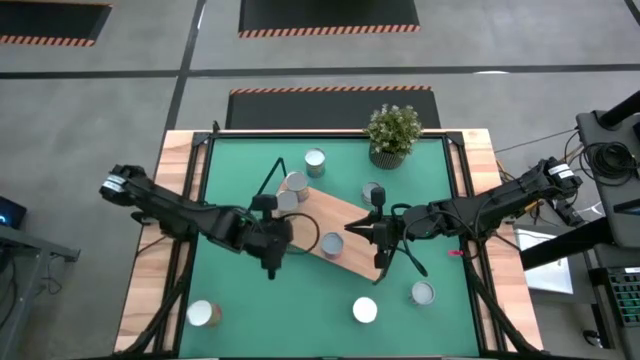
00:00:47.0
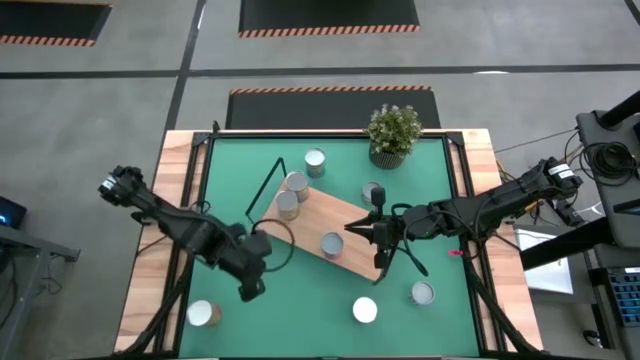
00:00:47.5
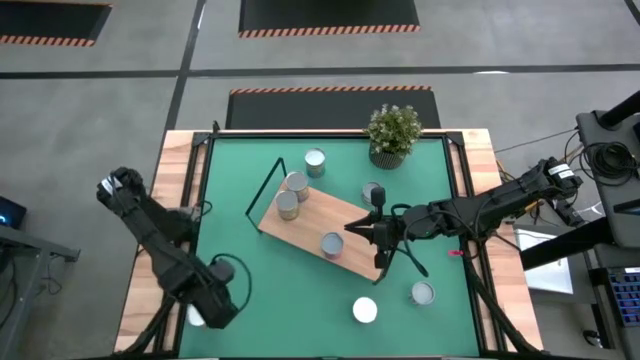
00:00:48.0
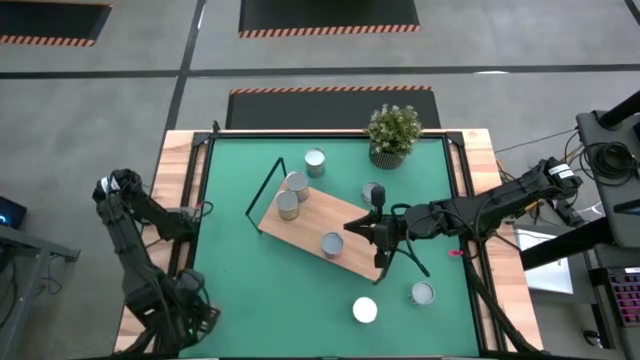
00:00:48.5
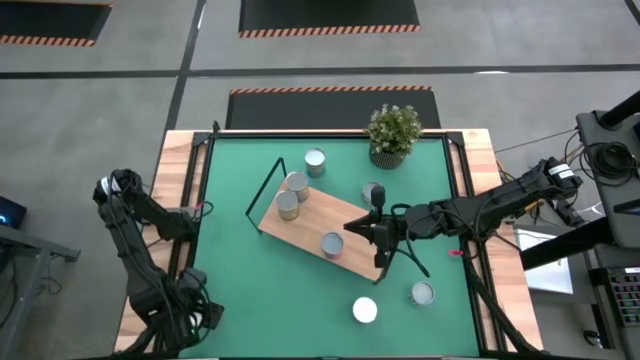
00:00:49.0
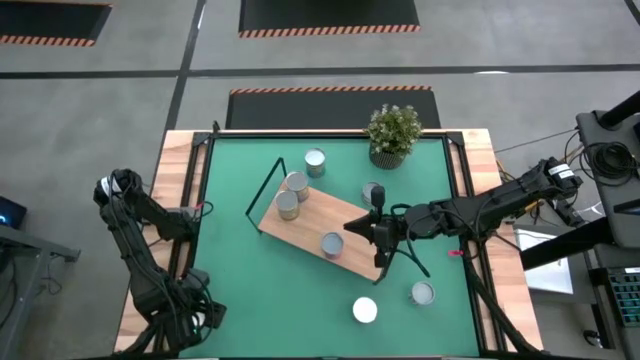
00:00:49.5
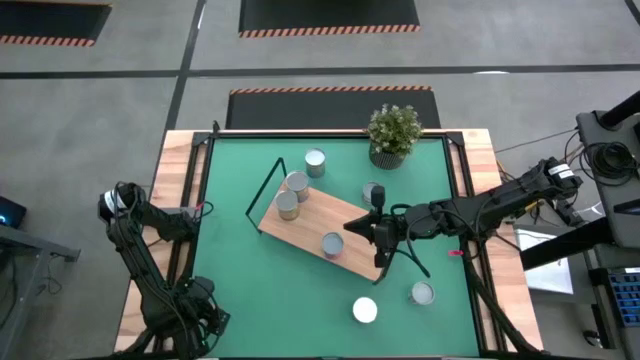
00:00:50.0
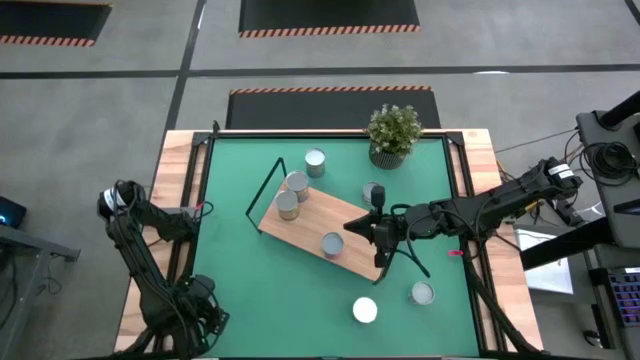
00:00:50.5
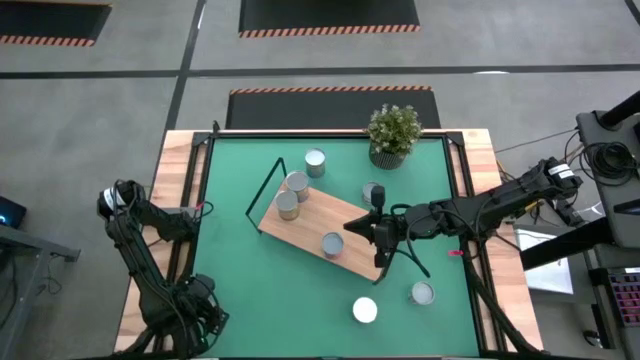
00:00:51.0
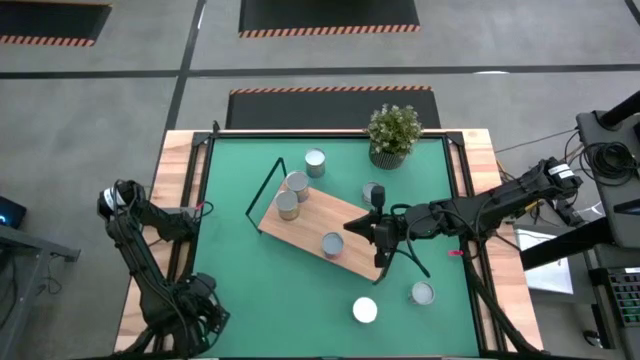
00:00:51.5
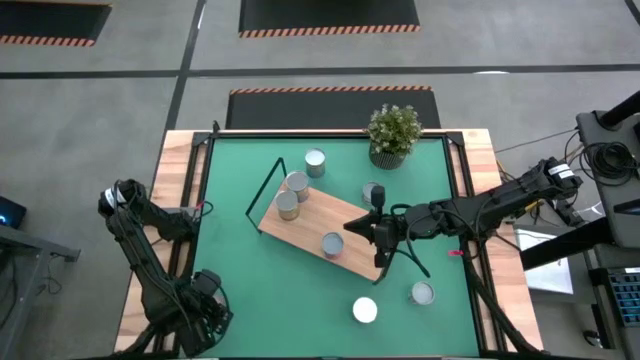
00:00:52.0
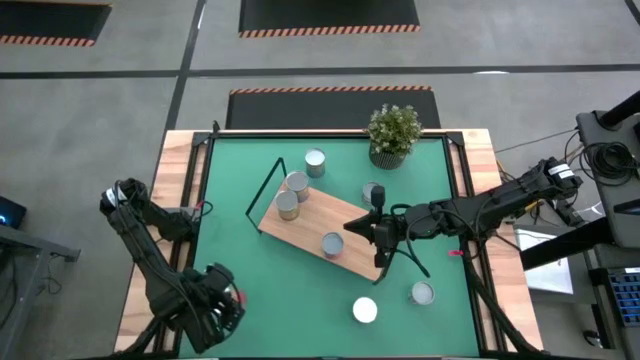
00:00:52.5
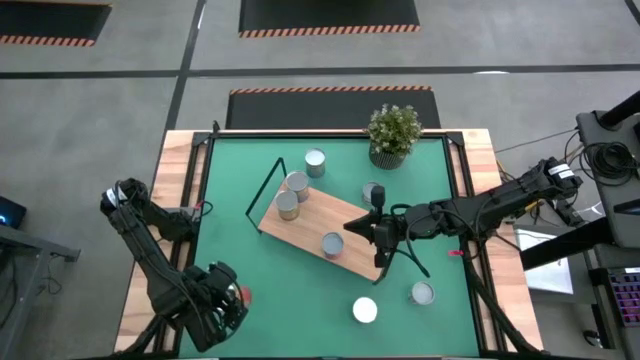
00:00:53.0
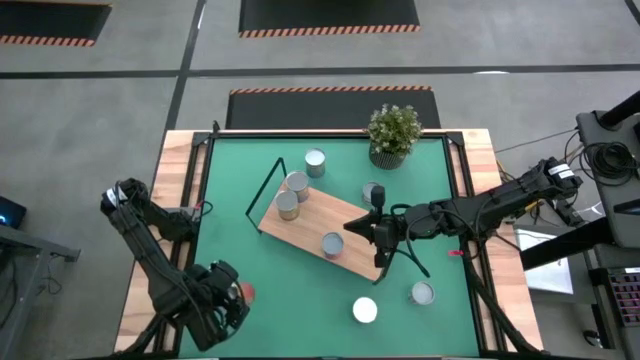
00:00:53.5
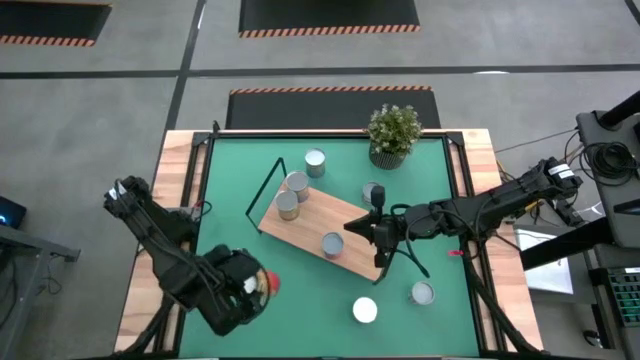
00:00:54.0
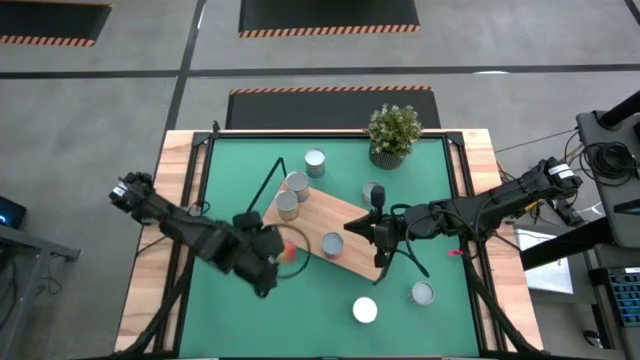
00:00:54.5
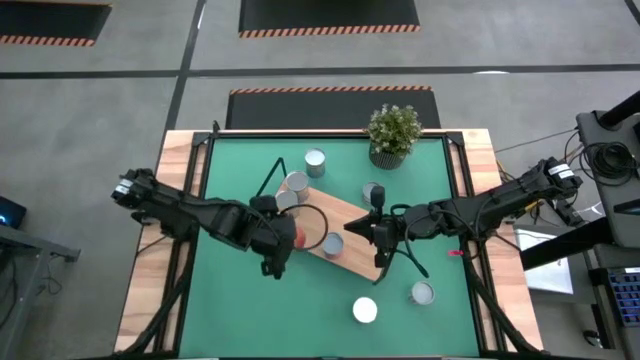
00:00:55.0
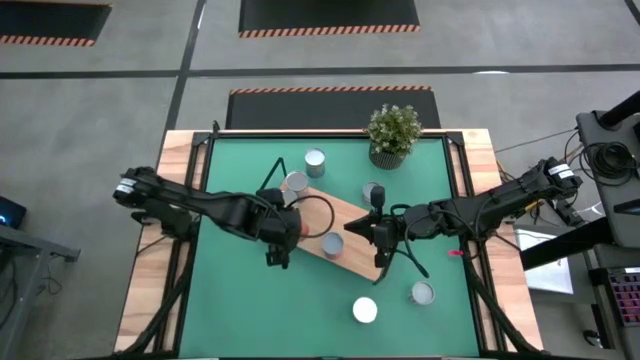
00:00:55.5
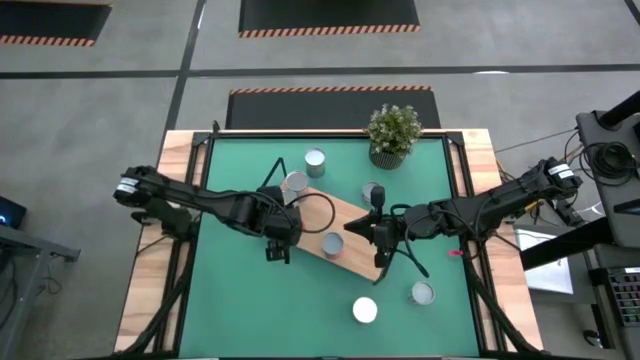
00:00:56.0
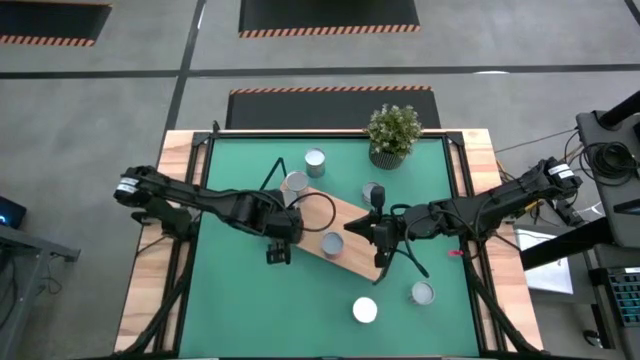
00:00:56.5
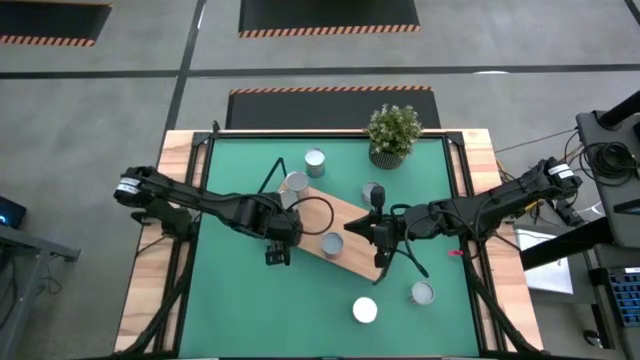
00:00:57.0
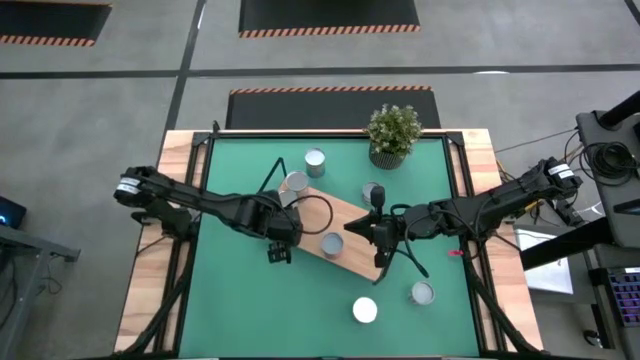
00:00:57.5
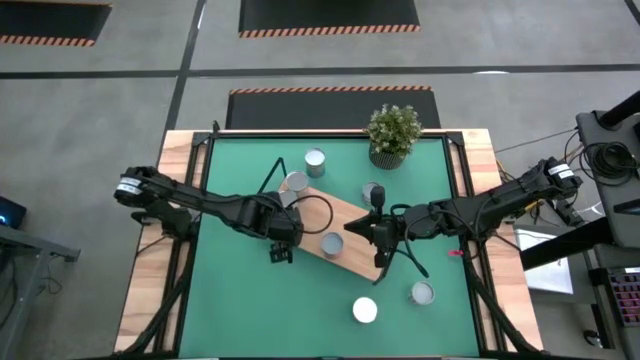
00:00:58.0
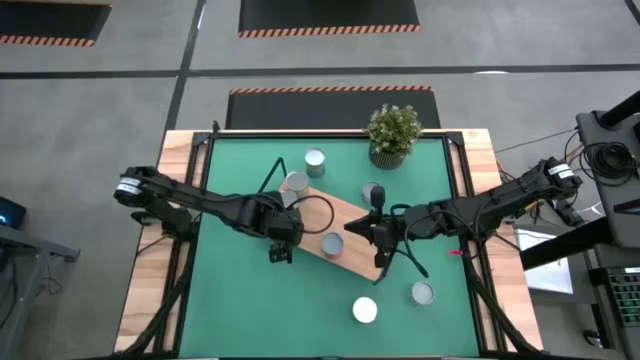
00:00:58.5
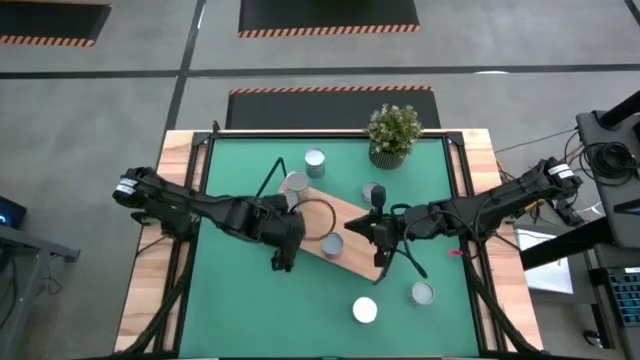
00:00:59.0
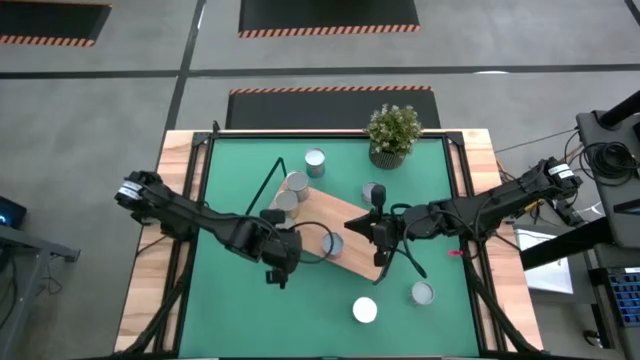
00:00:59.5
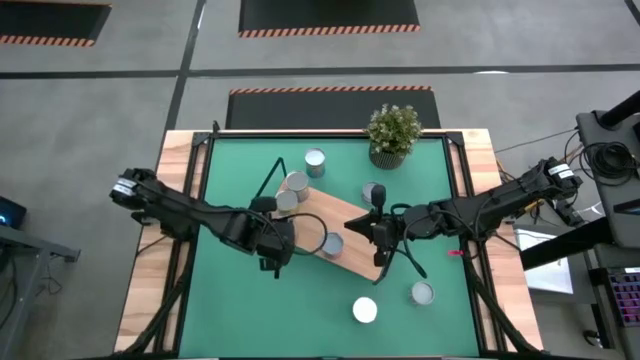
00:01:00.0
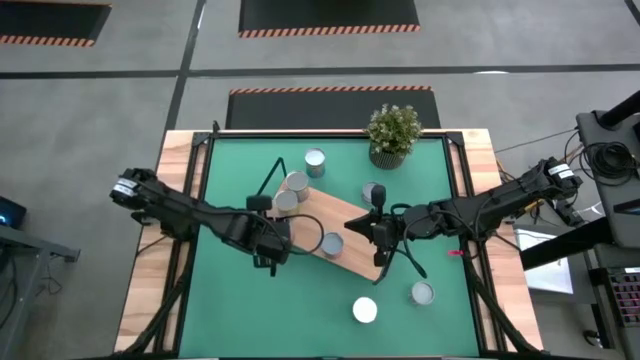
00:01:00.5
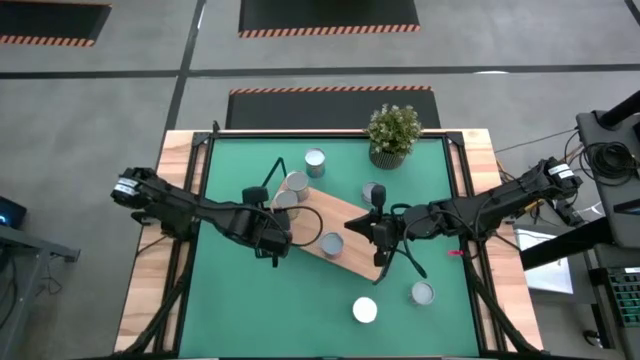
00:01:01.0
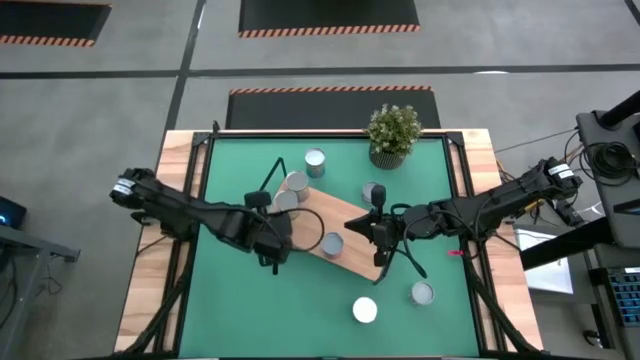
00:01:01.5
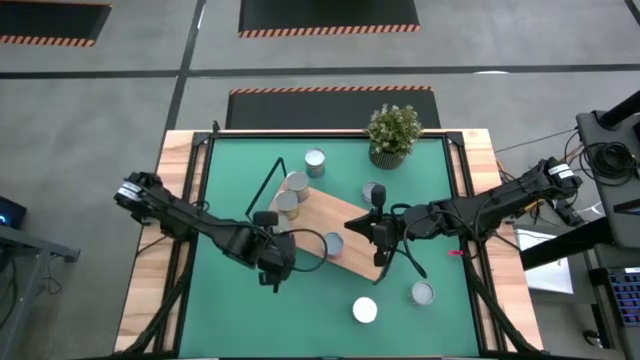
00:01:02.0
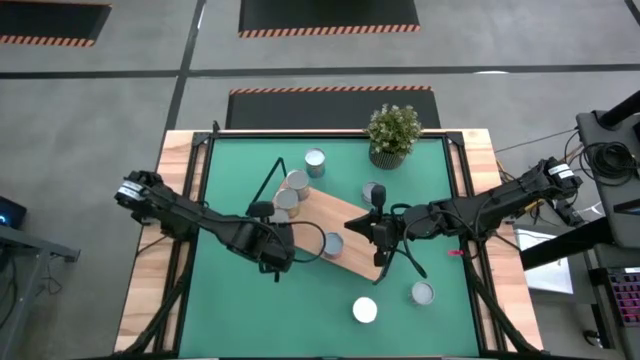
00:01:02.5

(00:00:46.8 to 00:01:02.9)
Task: Pick and place cans onto a shelf
Put the canned pineapple on the shelf

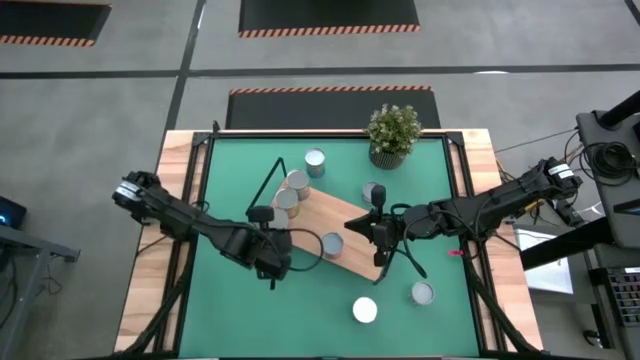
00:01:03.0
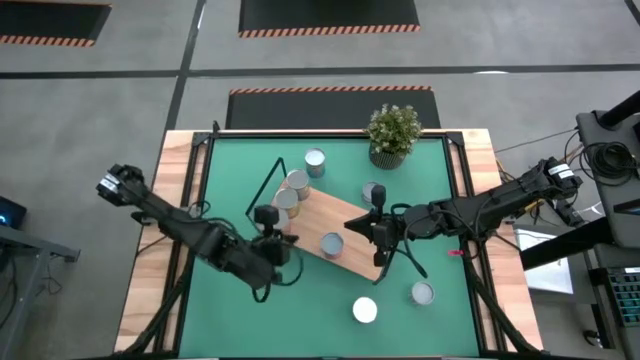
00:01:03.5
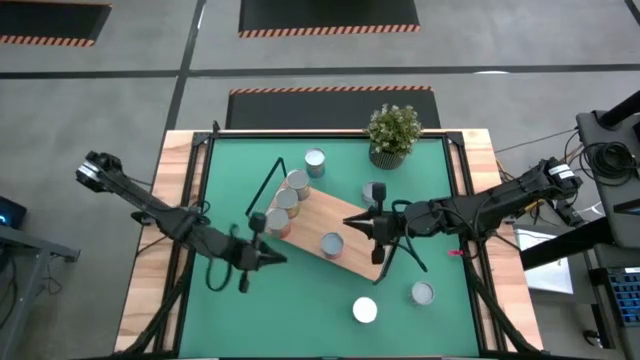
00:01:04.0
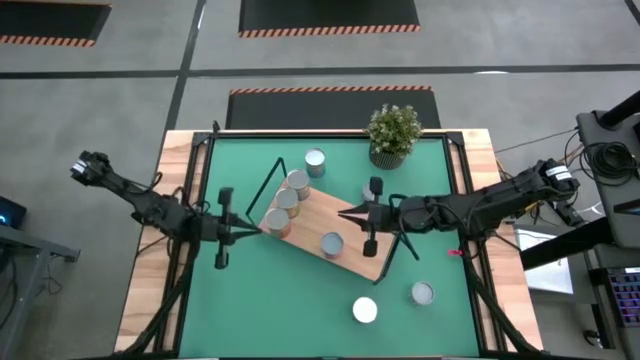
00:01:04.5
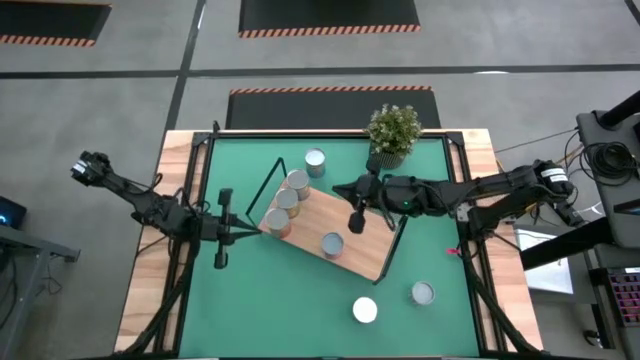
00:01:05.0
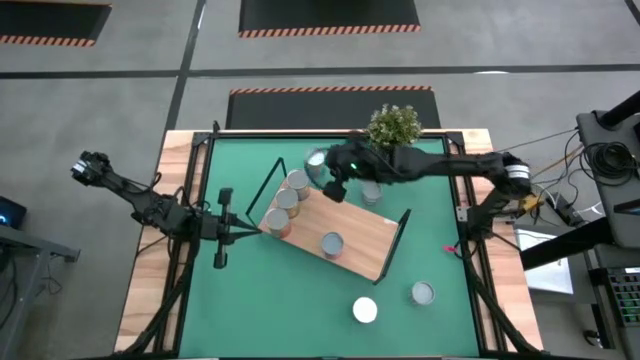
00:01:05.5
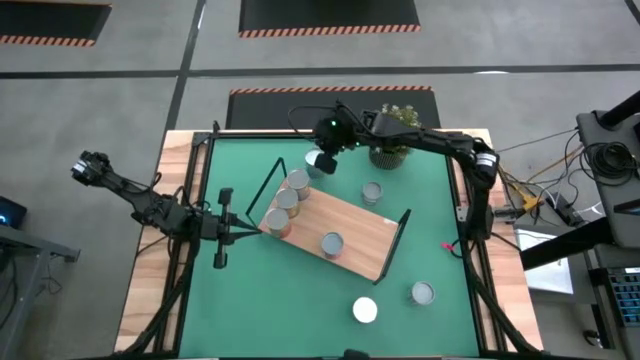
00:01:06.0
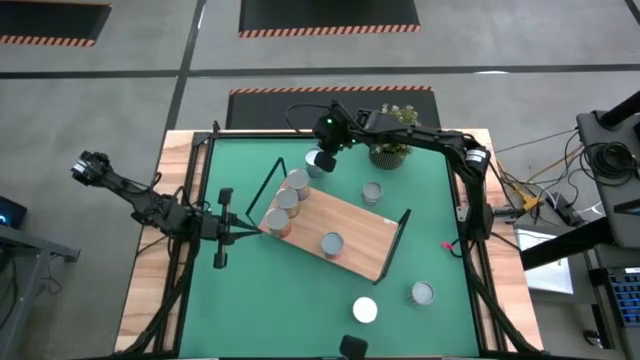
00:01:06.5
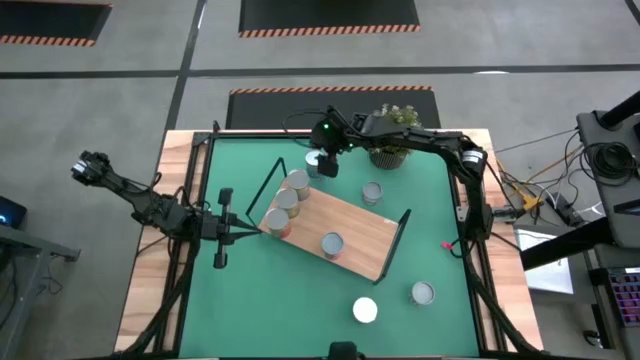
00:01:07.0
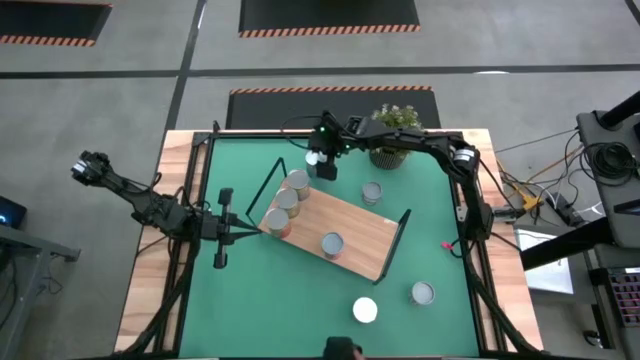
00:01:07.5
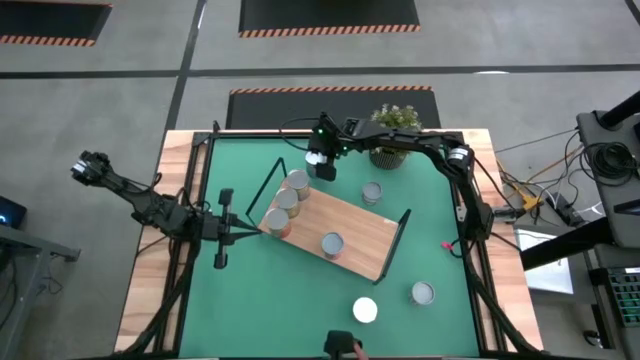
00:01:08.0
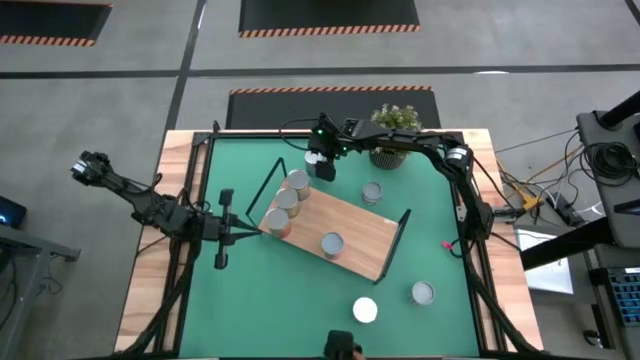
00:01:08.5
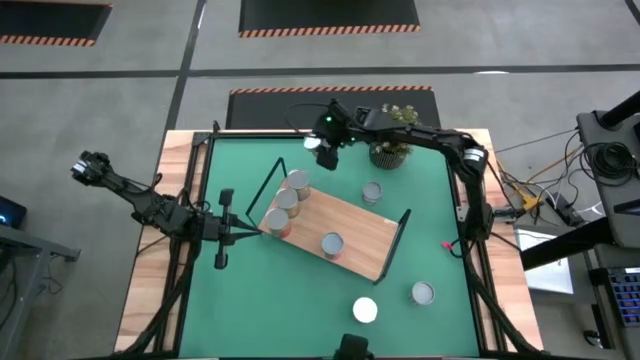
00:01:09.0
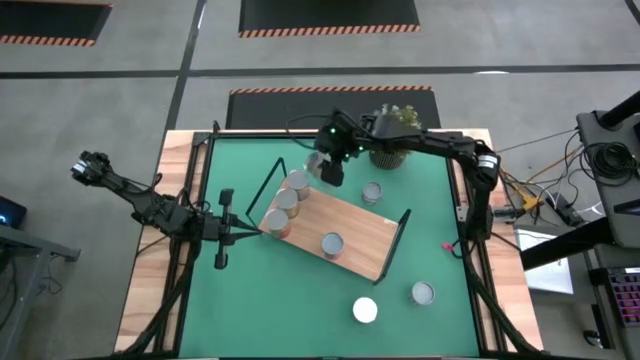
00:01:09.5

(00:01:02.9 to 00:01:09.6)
Put the canned cherries on the shelf
